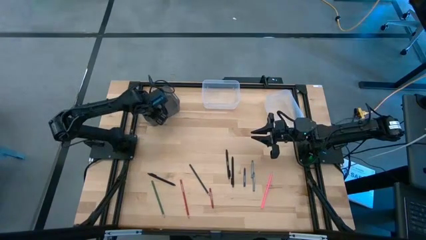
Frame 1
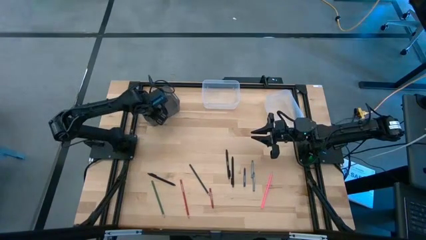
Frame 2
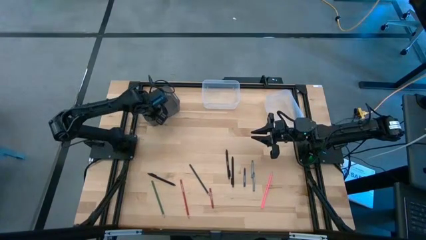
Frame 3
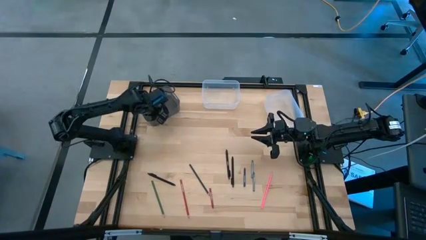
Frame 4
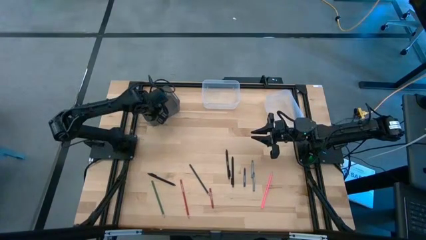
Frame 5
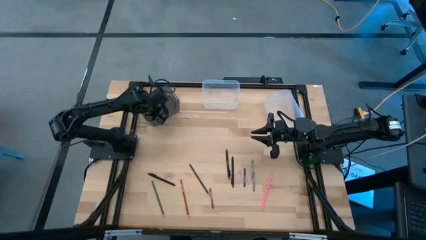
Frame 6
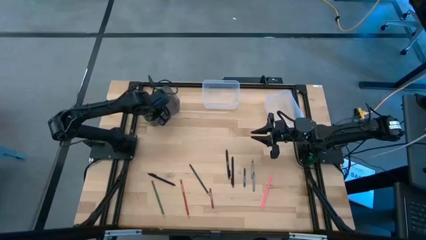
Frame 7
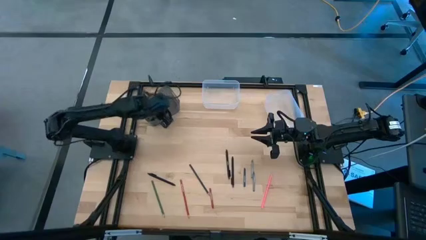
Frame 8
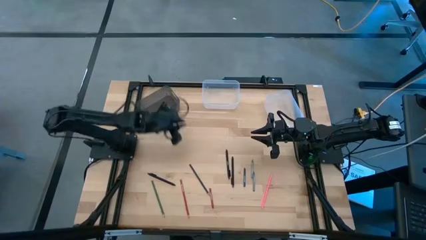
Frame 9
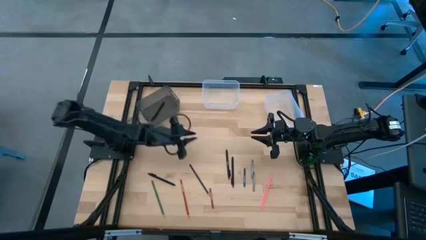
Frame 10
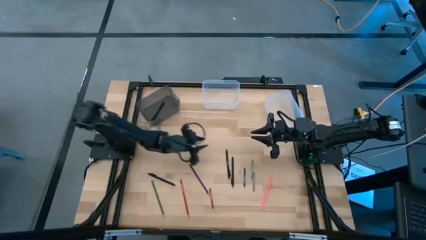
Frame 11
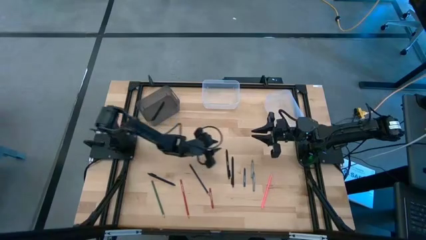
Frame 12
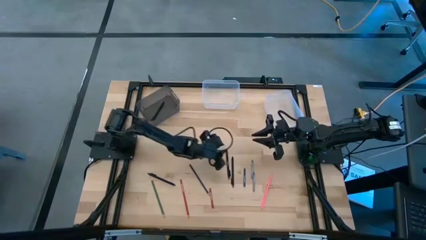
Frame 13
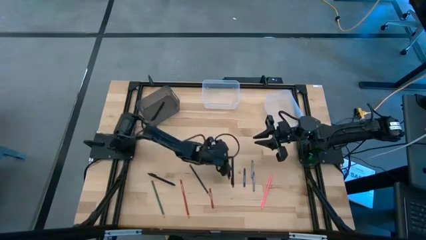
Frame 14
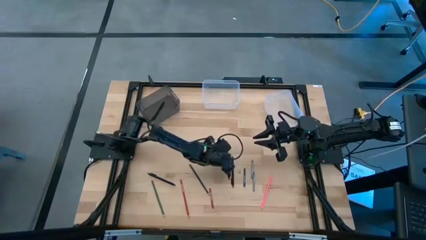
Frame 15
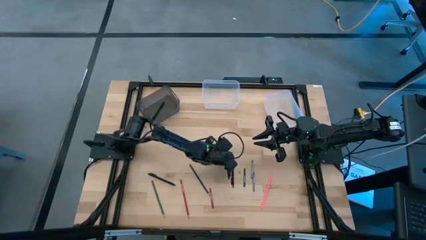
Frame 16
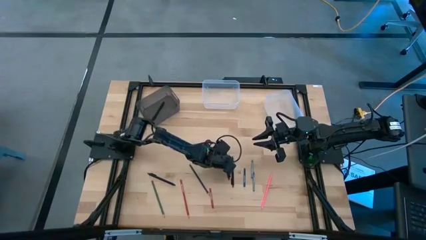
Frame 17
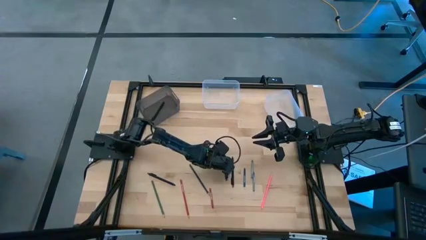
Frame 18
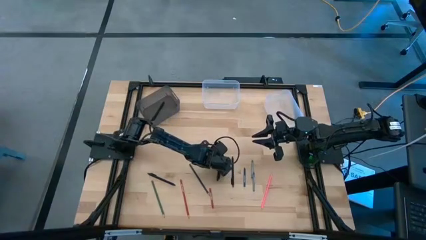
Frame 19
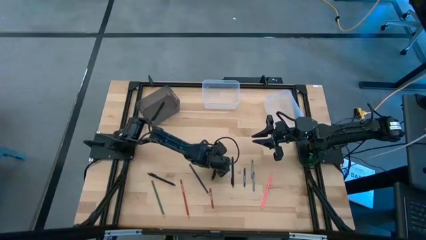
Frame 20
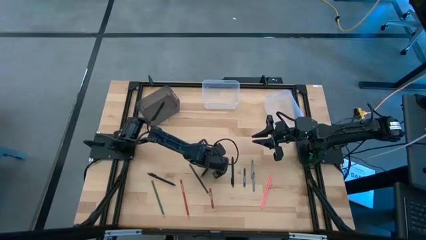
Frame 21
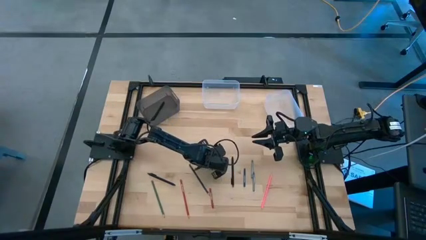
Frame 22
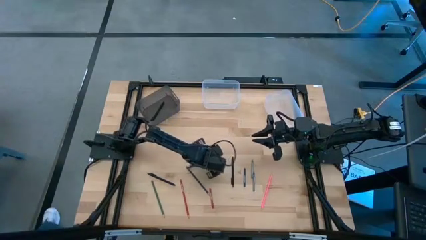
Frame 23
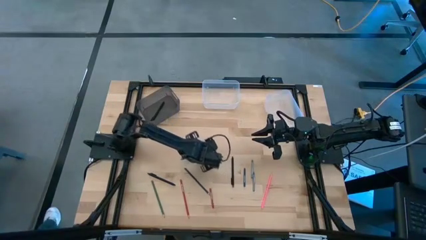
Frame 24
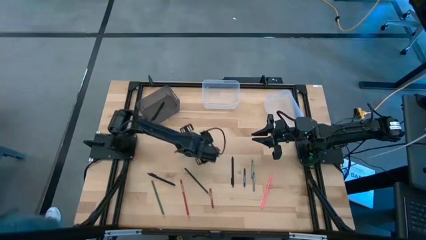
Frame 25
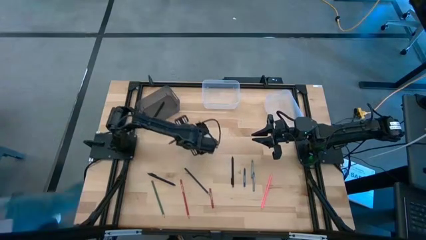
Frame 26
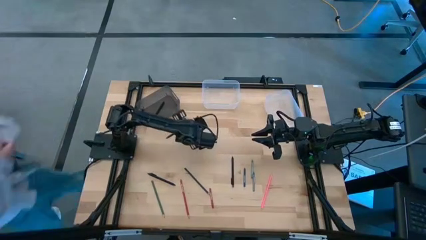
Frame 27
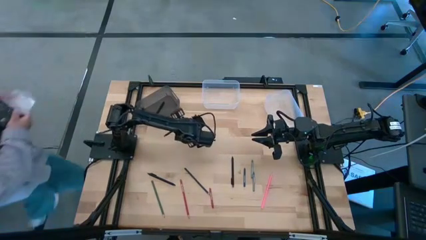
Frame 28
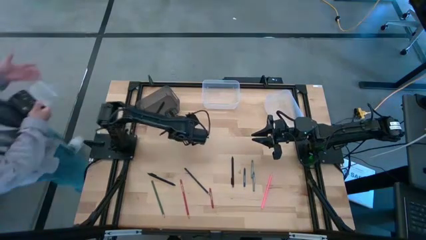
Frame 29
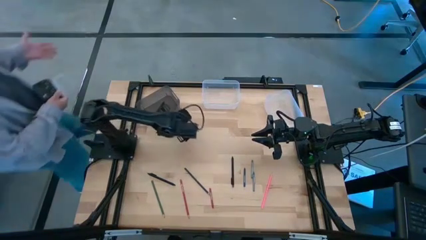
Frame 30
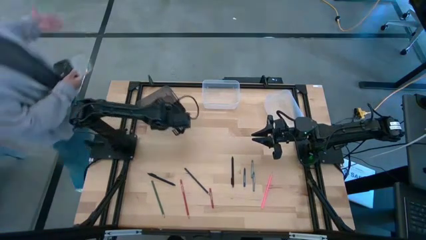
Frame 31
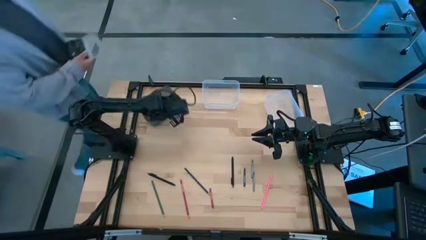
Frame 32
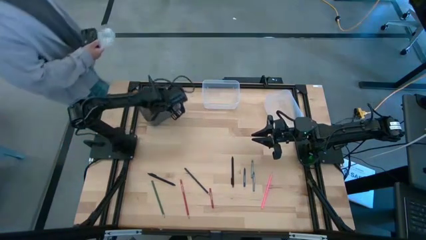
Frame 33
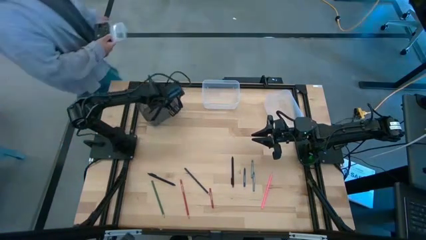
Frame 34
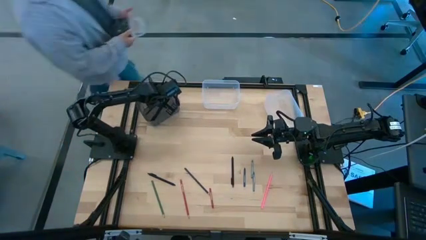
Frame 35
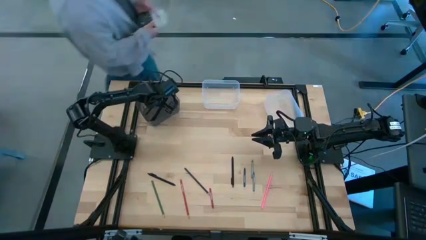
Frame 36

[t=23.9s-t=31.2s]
Task: Sort crayons/erasers/pens/pencils in bins
Put the black pen into the black bin

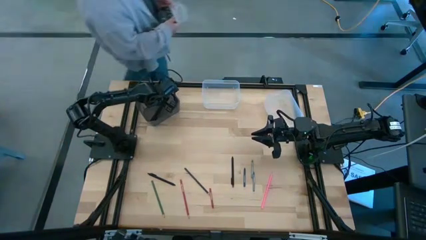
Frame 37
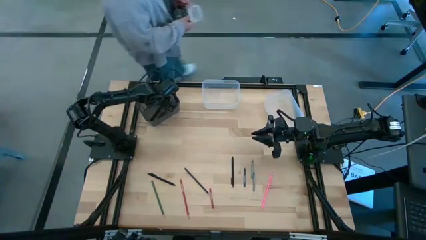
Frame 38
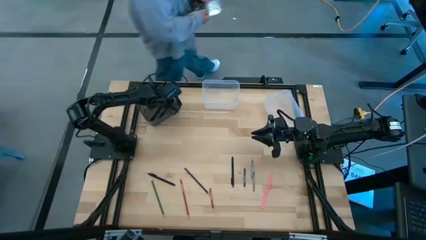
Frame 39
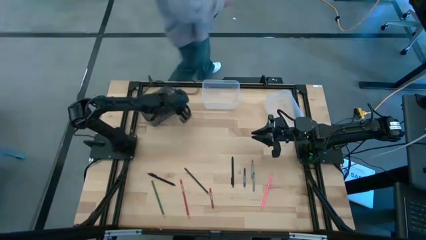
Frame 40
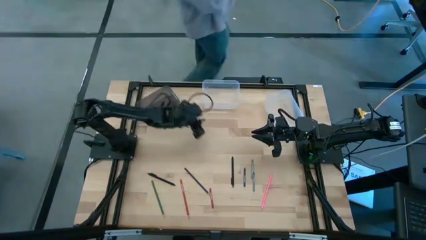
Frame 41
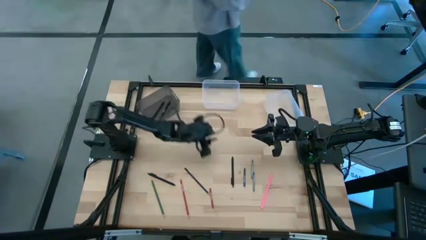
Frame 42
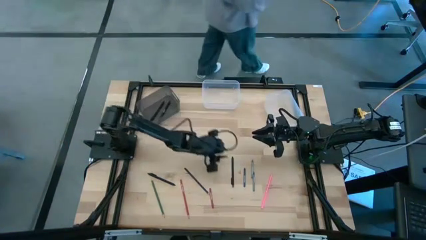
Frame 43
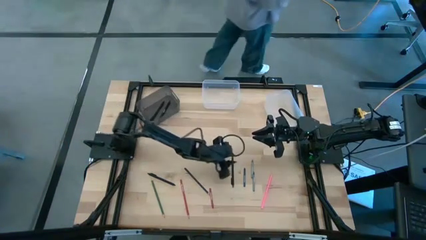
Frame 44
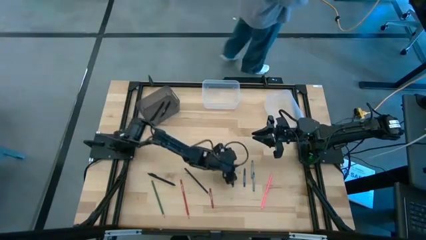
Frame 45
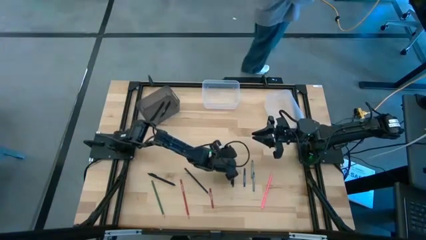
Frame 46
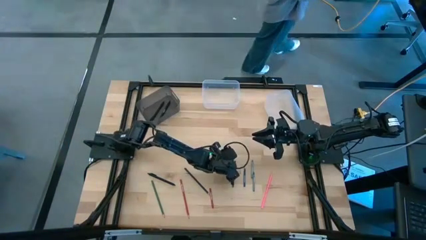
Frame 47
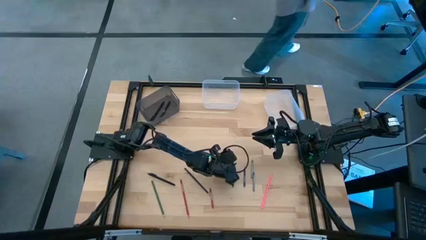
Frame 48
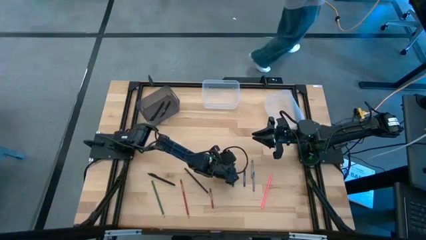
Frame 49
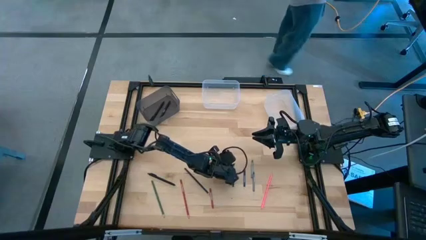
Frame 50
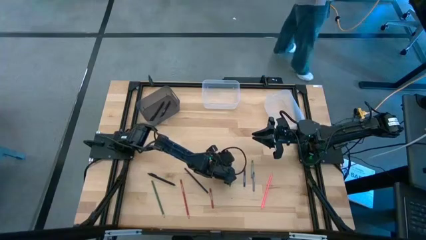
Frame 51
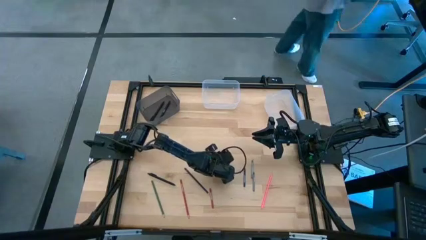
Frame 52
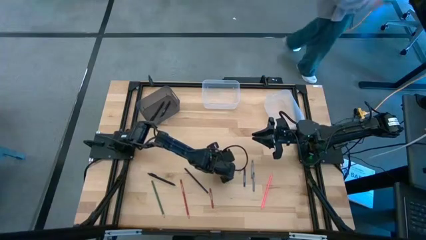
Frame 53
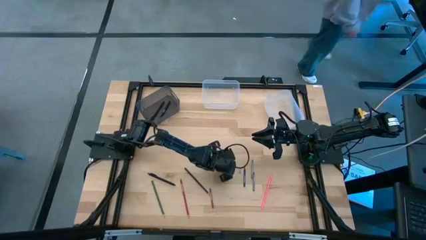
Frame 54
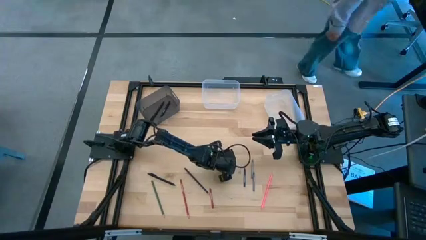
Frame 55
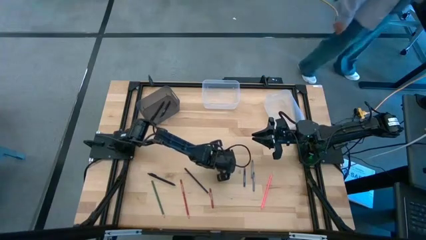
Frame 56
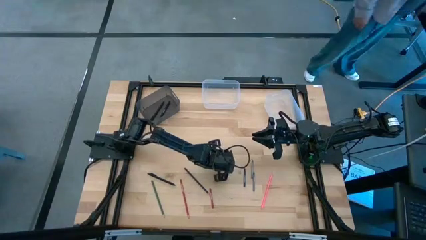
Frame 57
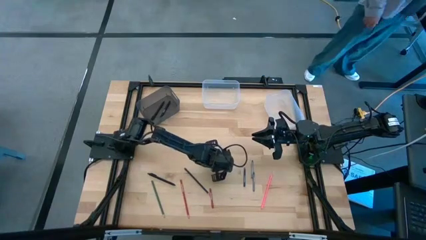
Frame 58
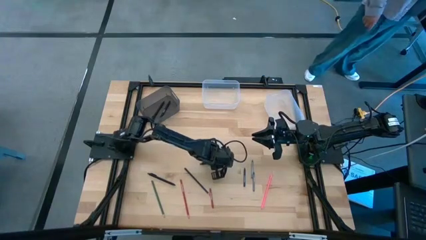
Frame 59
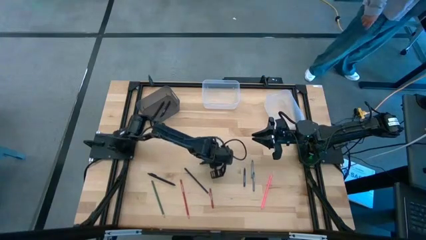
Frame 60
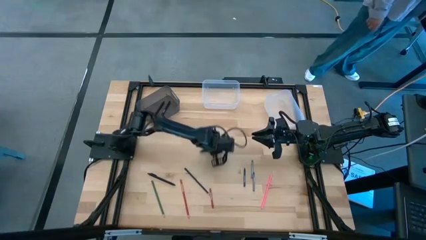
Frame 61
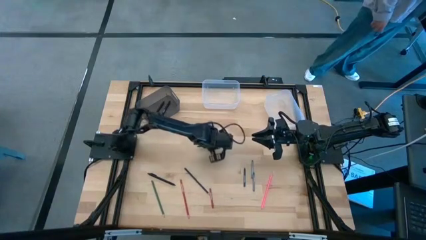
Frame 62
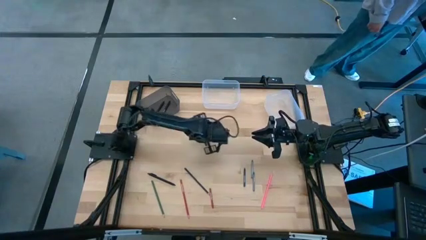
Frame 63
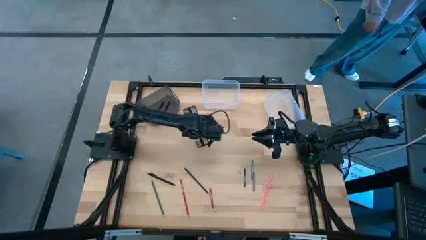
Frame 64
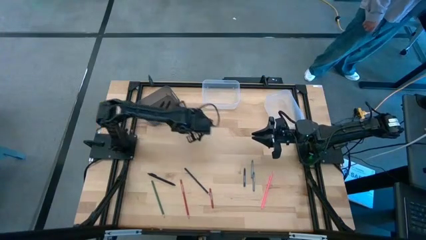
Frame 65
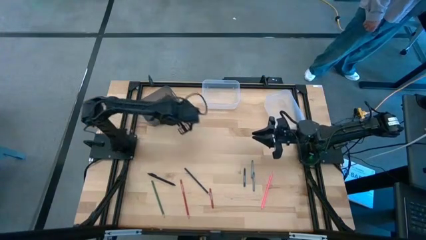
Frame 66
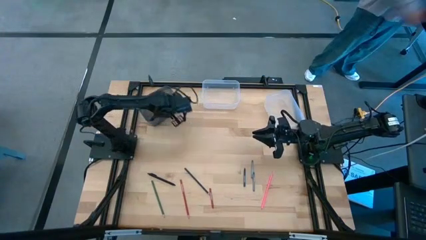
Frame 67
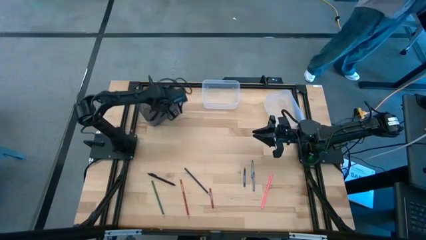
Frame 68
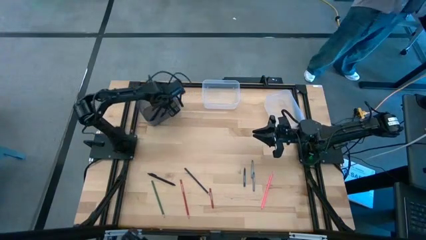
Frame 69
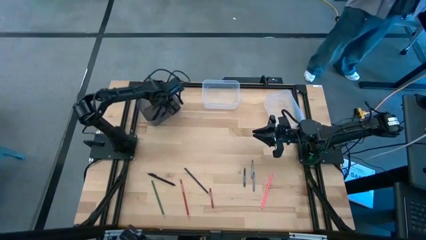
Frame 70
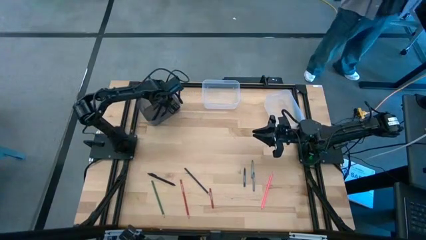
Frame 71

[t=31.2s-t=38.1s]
Put the black pen into the black bin

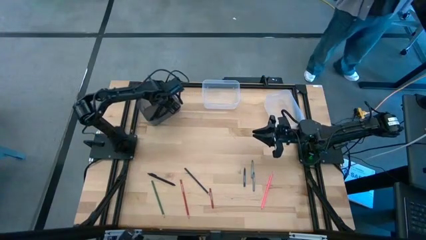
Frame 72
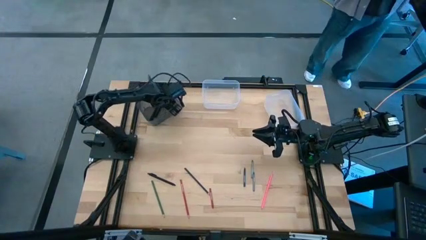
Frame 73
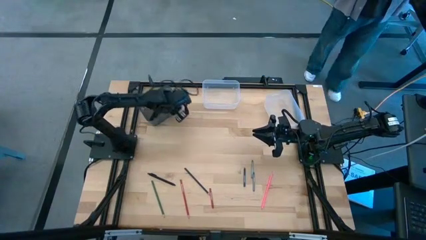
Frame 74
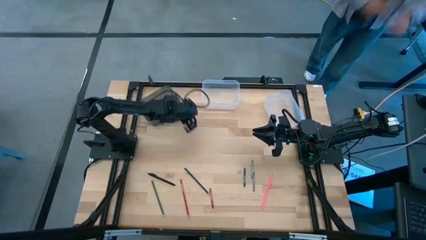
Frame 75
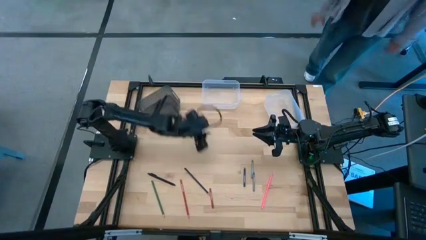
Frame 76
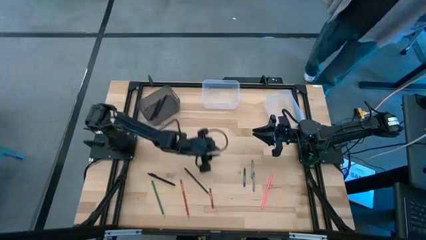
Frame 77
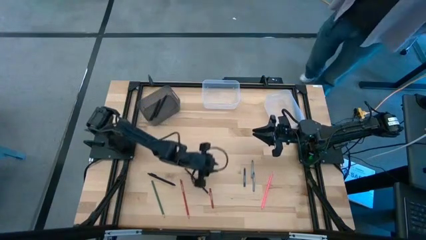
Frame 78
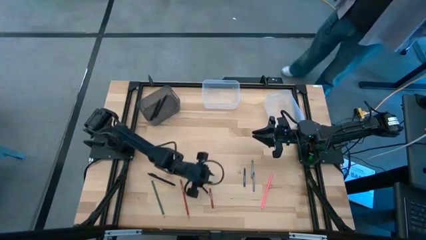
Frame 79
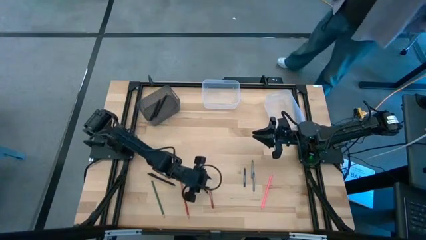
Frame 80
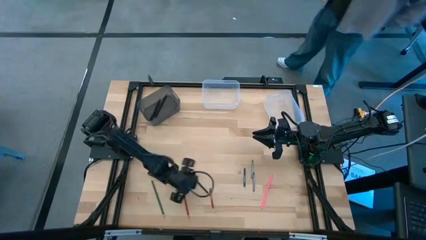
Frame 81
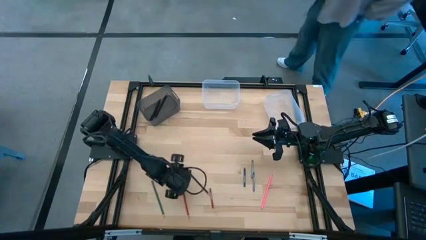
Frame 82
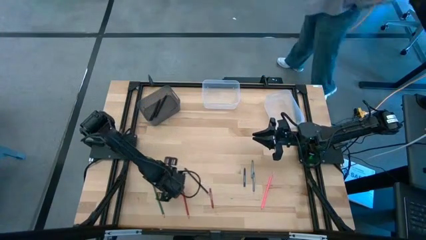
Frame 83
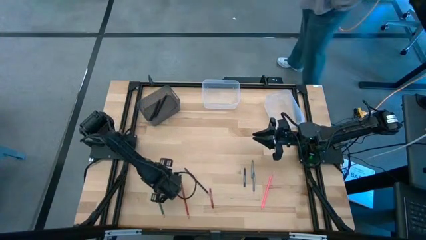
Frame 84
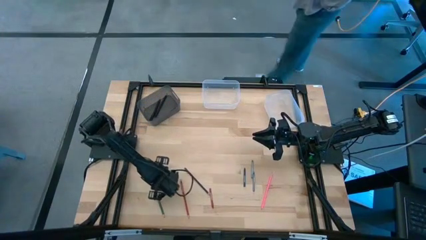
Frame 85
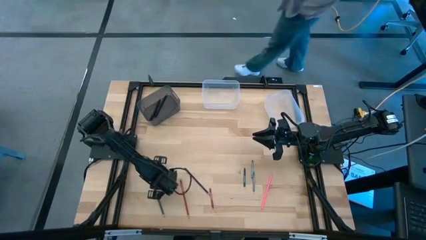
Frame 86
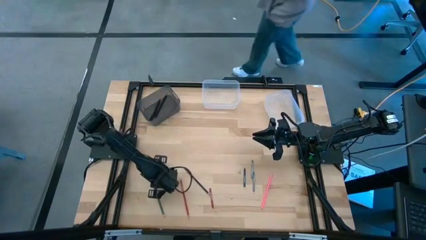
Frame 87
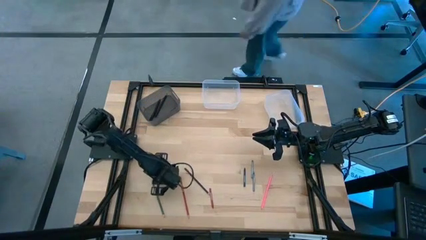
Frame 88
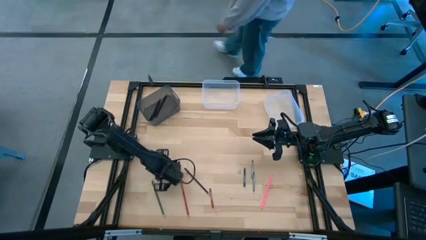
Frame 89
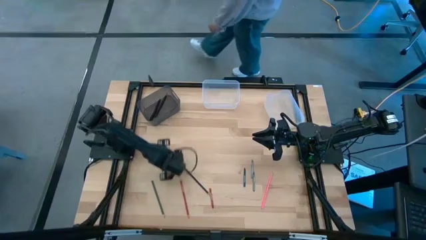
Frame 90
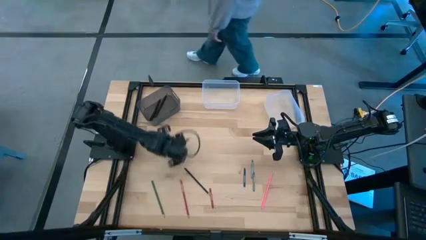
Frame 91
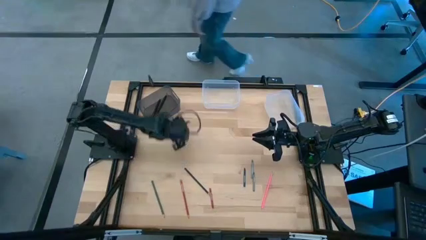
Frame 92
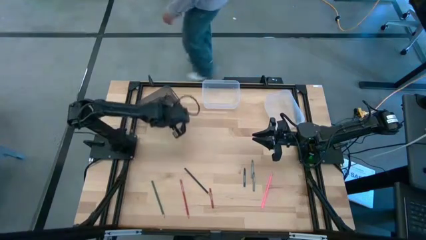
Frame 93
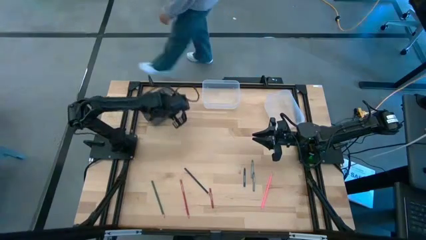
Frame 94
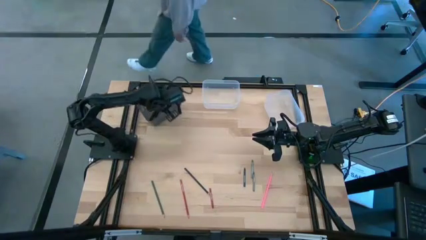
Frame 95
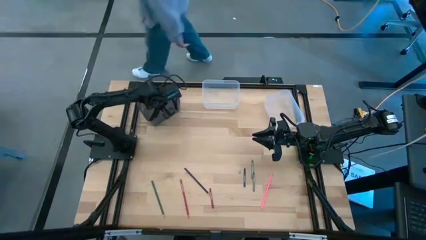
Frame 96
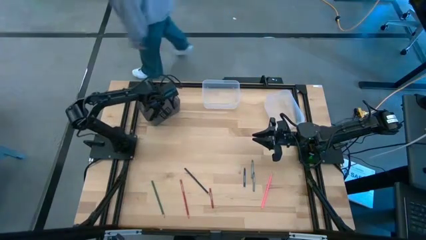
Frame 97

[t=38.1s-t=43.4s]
Put the black pen into the black bin
